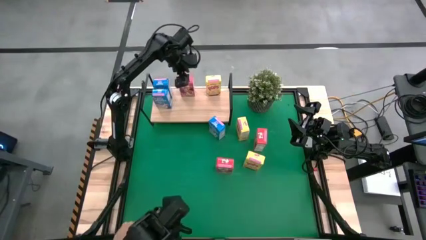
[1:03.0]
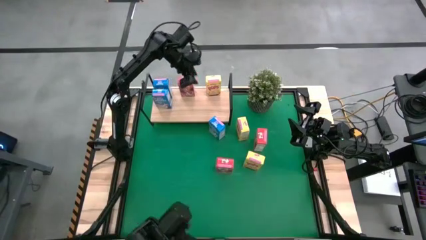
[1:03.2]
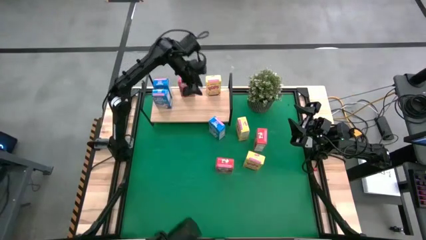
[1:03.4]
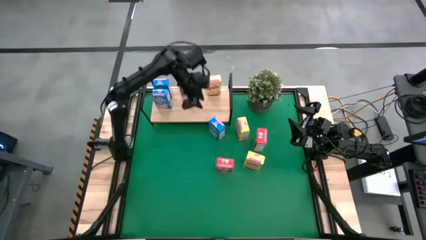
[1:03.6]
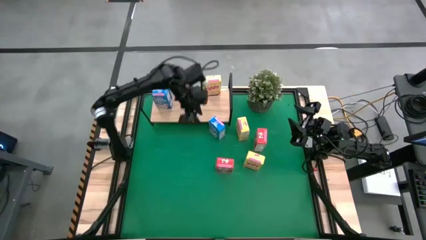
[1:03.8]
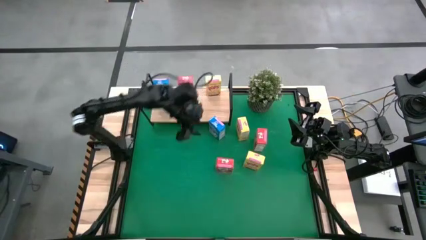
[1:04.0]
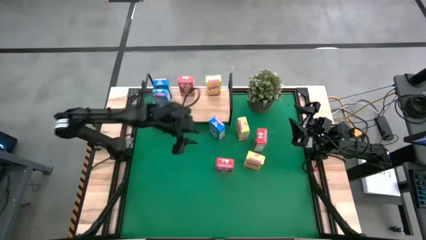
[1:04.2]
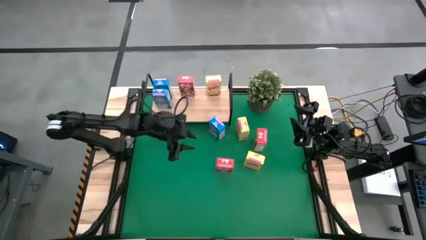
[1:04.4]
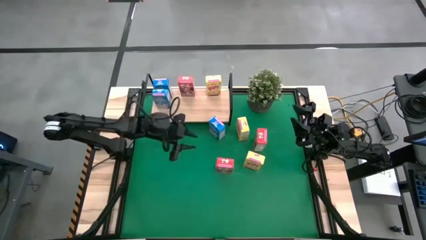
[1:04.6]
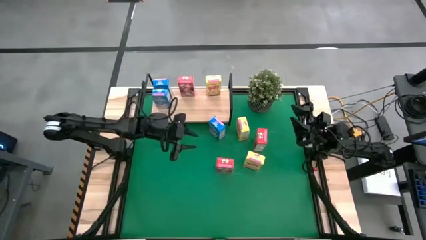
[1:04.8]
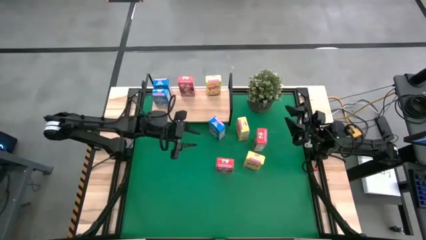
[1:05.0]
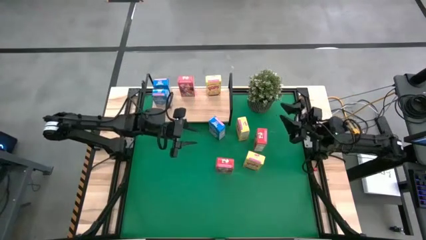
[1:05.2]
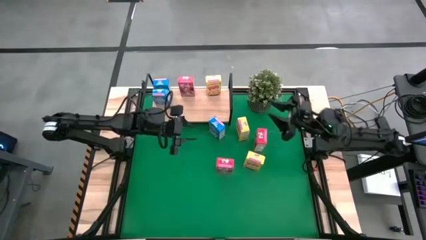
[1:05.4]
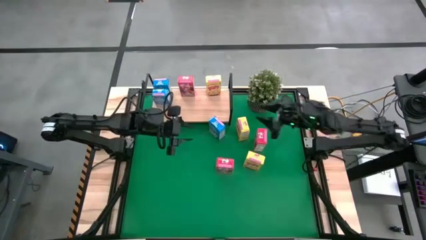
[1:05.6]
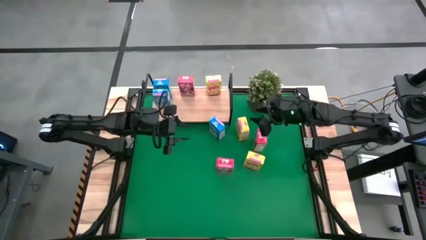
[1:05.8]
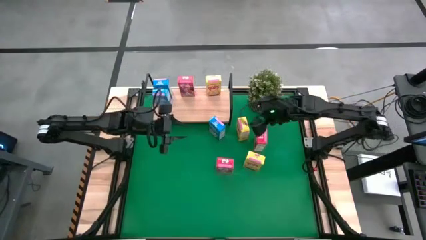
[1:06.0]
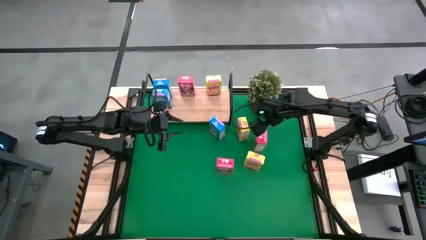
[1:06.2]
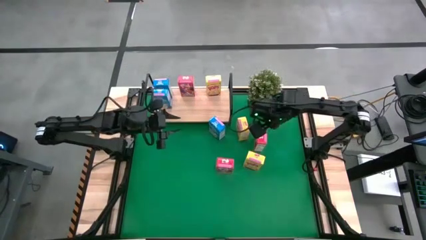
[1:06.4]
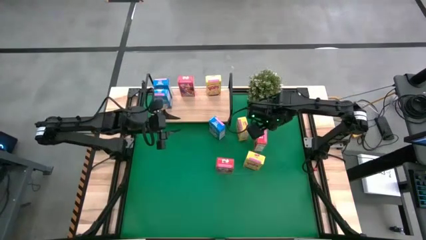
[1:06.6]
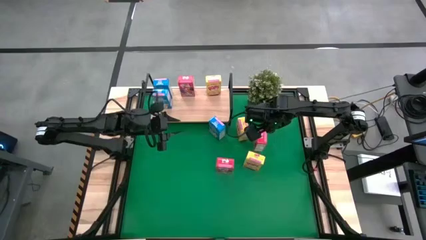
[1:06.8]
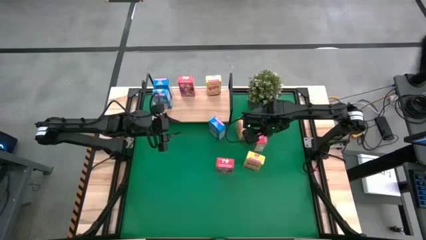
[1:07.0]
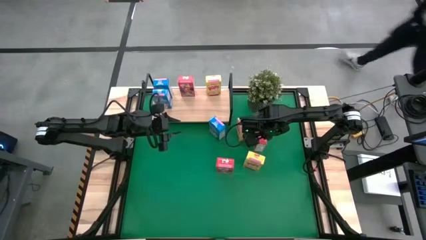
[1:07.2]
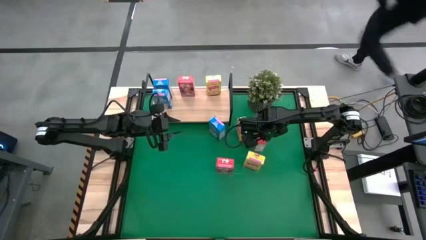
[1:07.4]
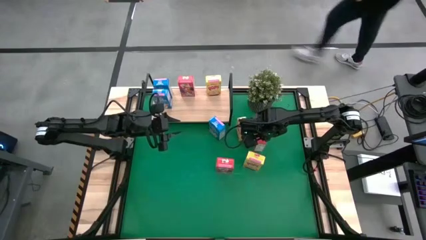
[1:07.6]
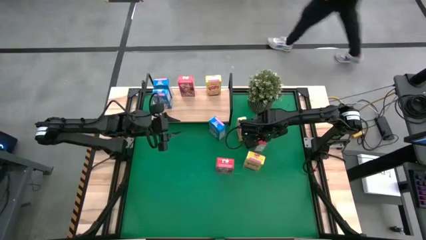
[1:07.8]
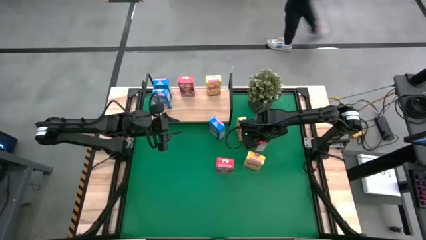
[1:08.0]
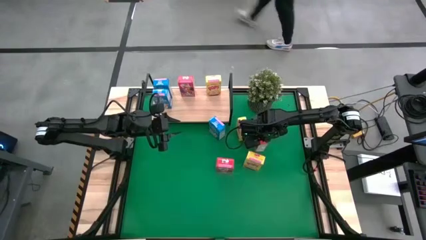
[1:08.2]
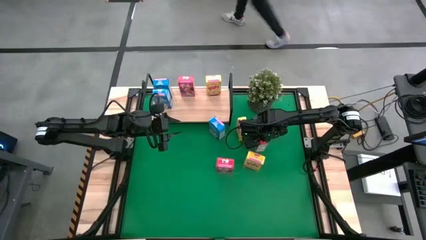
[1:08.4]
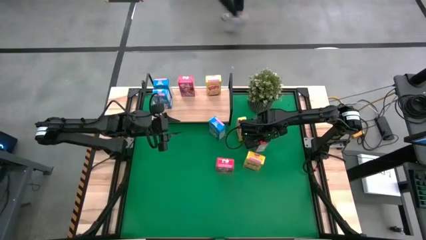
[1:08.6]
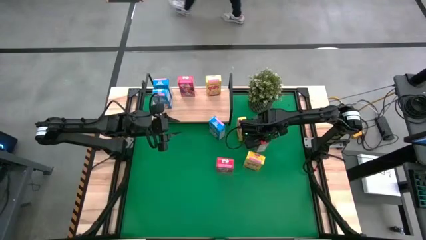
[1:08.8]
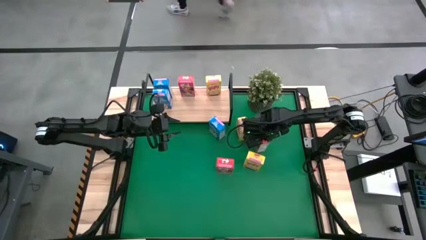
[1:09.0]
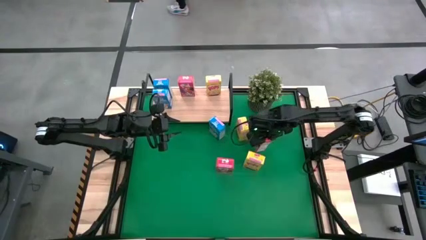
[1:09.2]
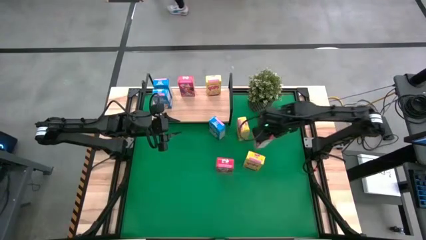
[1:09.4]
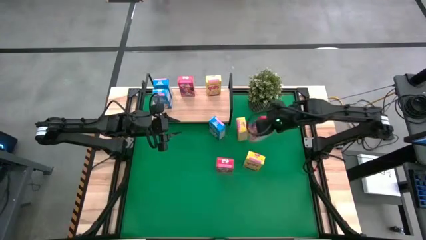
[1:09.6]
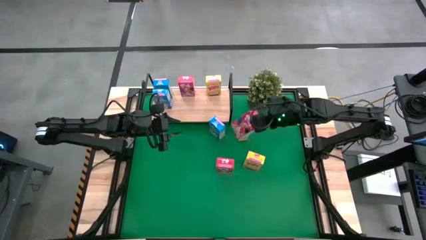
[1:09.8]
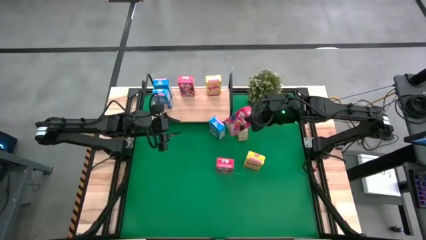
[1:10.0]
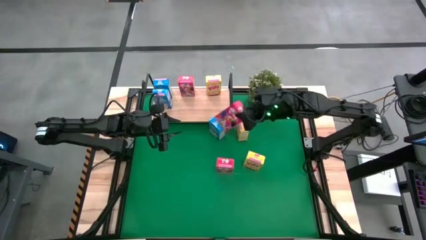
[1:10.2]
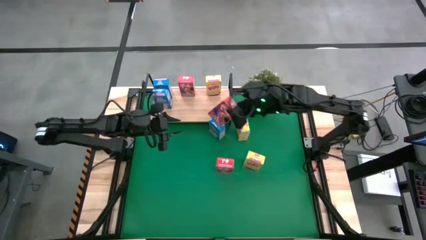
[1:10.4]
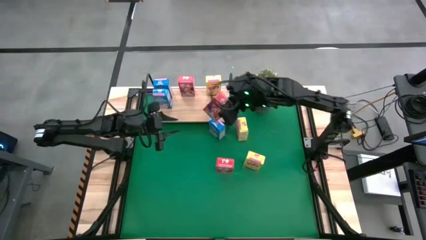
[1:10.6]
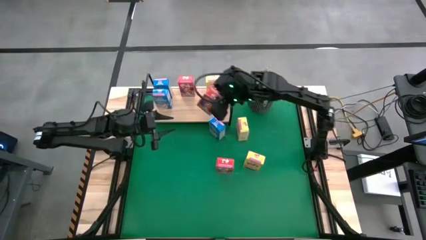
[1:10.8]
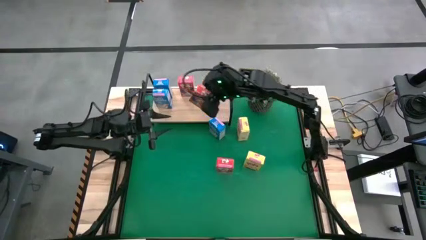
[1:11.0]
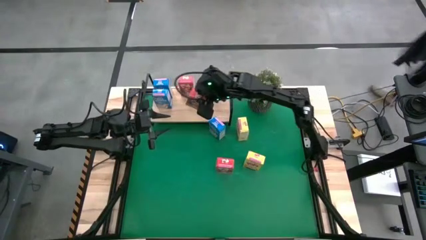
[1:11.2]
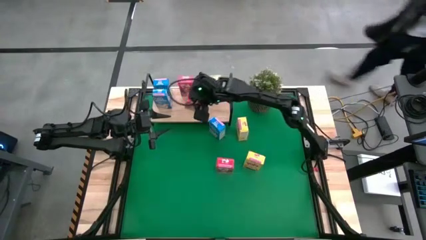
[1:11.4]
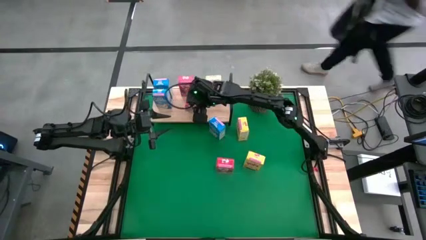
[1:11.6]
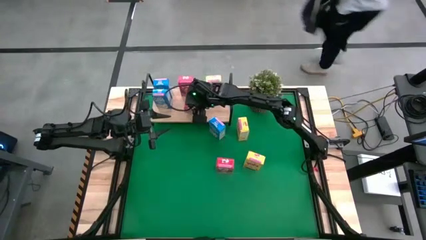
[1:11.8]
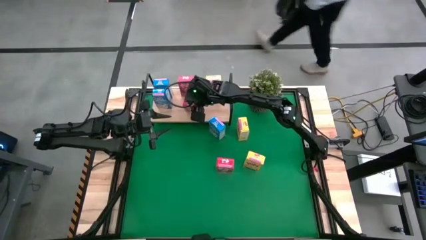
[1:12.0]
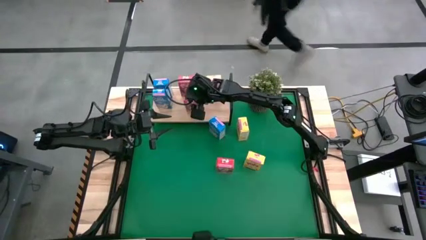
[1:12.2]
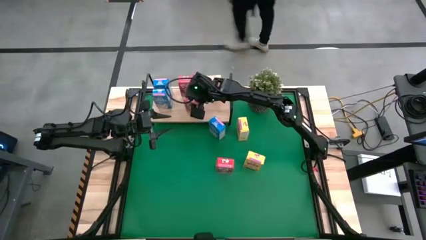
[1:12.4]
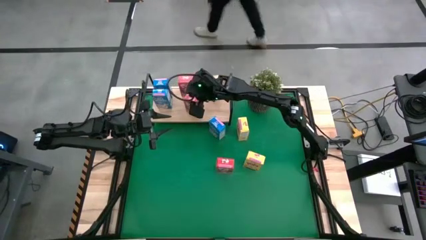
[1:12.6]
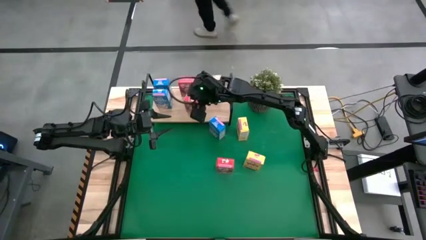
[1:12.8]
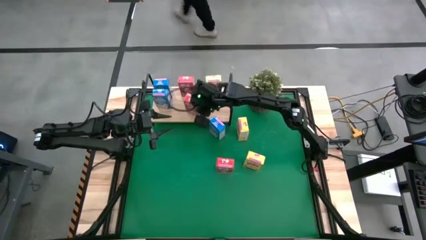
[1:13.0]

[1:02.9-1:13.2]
Task: Stack cereal on shelf
Put the top red cereal box aligned with the other red cereal box on the shelf

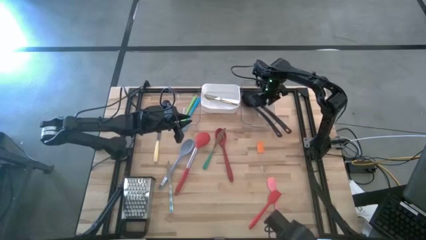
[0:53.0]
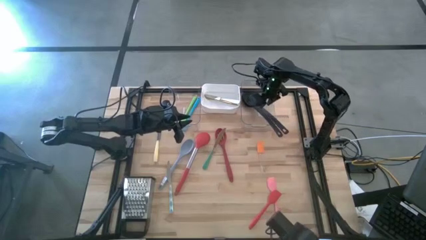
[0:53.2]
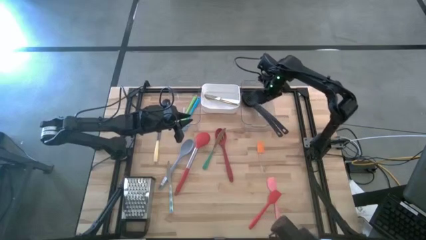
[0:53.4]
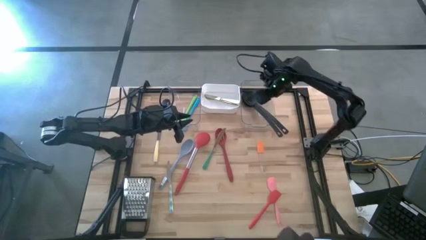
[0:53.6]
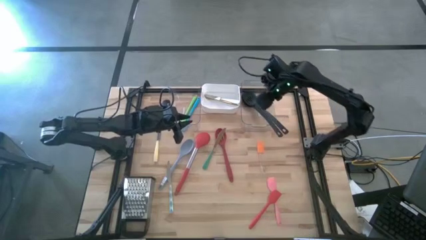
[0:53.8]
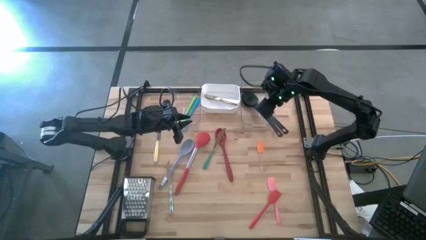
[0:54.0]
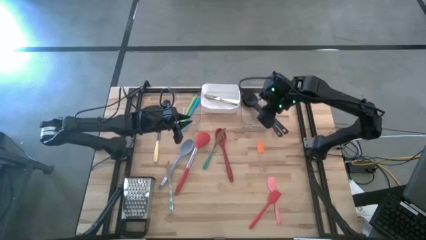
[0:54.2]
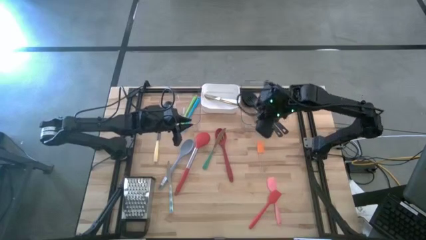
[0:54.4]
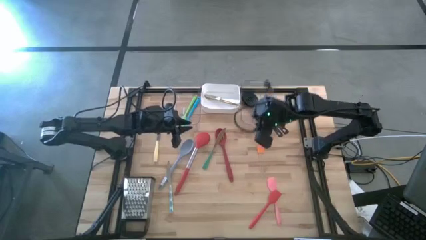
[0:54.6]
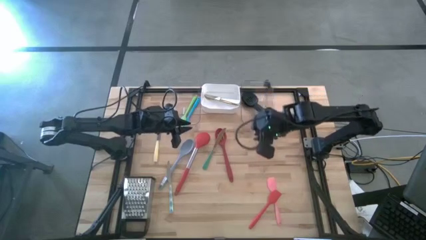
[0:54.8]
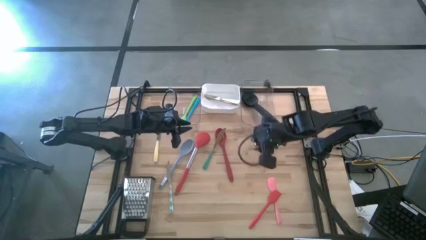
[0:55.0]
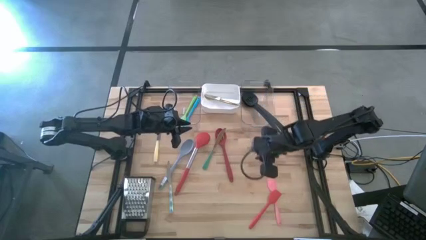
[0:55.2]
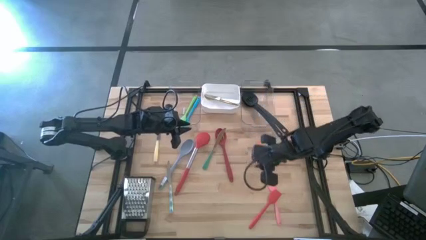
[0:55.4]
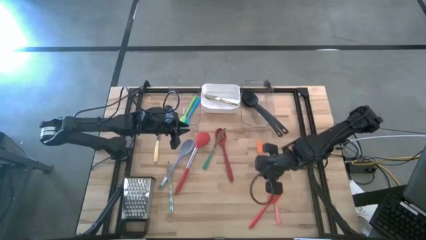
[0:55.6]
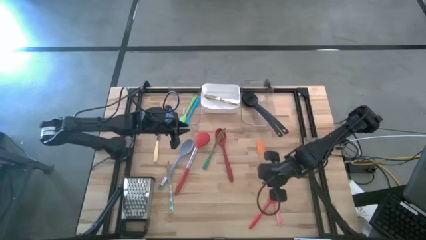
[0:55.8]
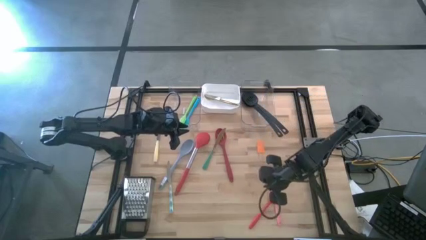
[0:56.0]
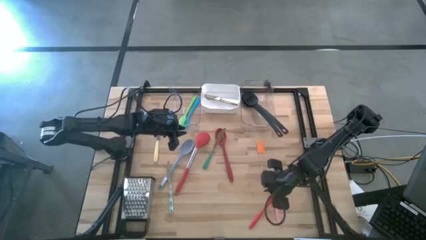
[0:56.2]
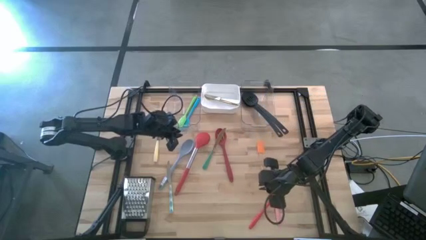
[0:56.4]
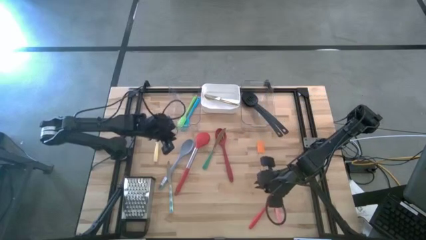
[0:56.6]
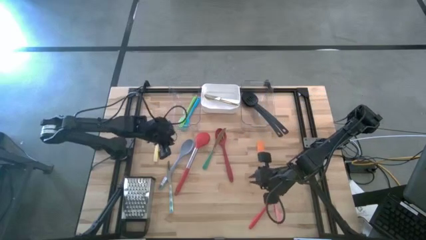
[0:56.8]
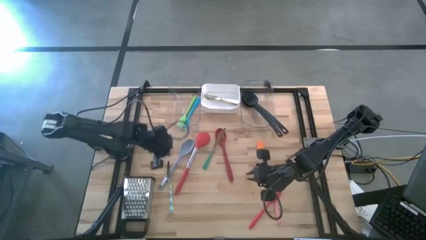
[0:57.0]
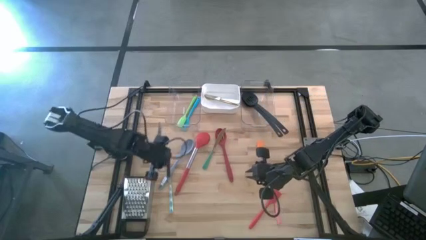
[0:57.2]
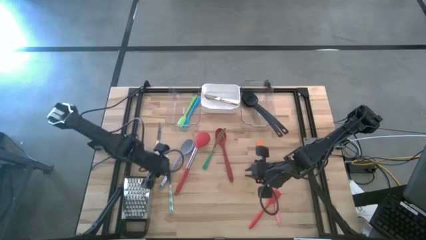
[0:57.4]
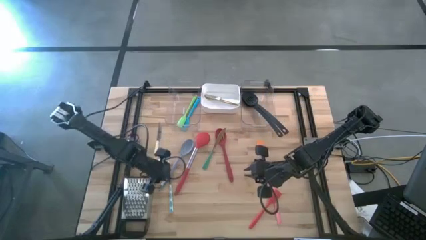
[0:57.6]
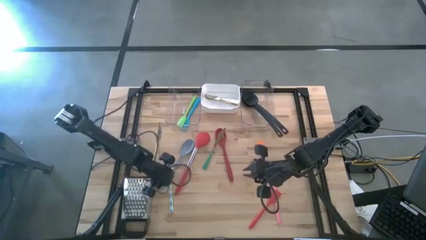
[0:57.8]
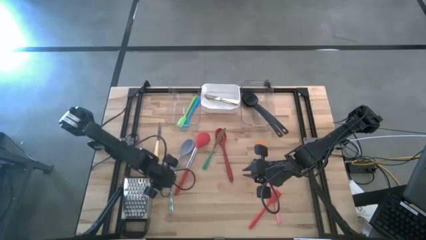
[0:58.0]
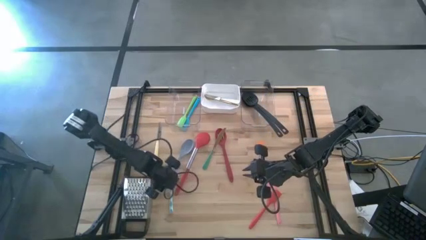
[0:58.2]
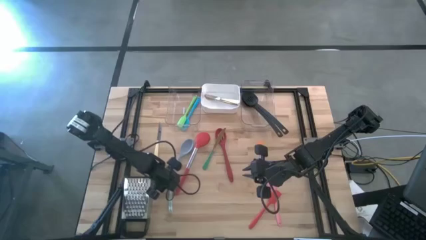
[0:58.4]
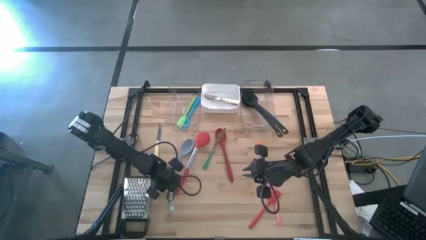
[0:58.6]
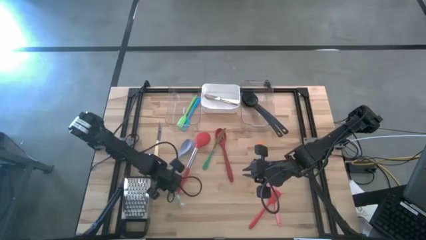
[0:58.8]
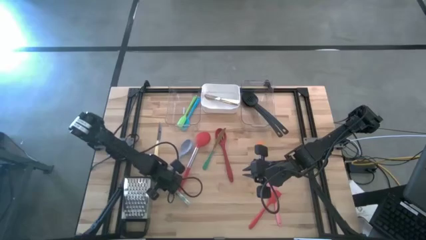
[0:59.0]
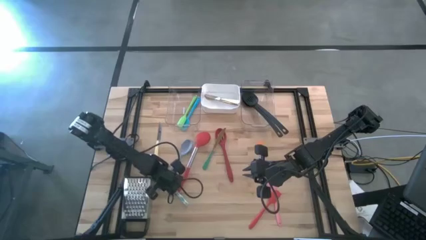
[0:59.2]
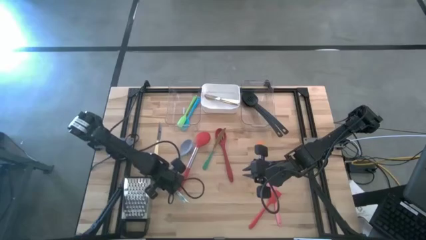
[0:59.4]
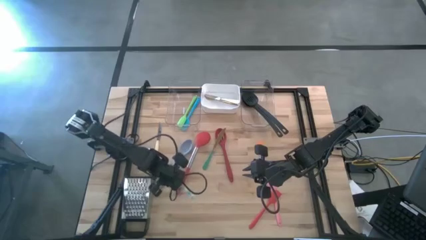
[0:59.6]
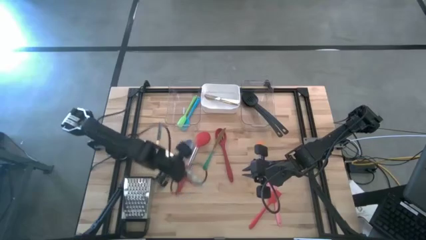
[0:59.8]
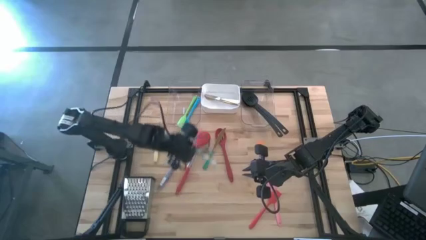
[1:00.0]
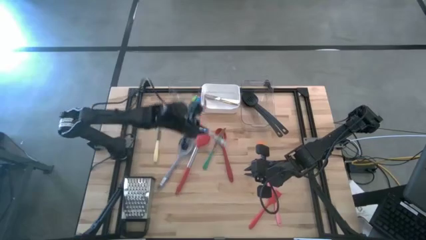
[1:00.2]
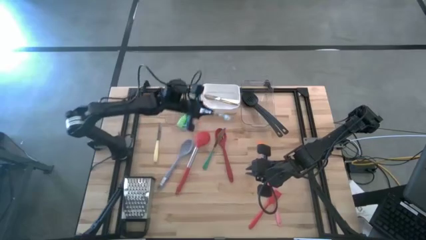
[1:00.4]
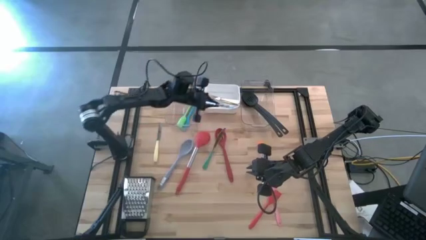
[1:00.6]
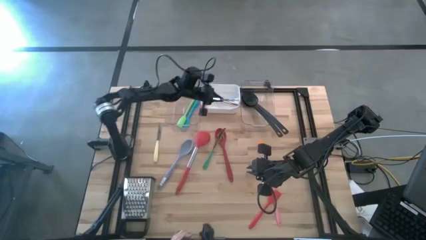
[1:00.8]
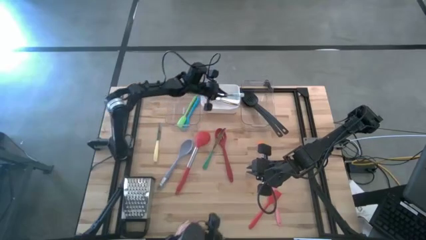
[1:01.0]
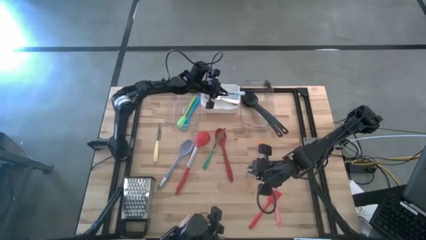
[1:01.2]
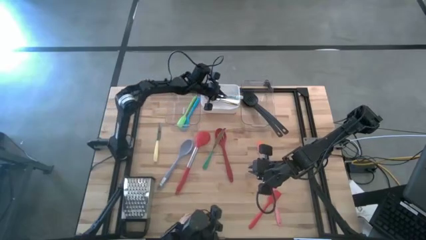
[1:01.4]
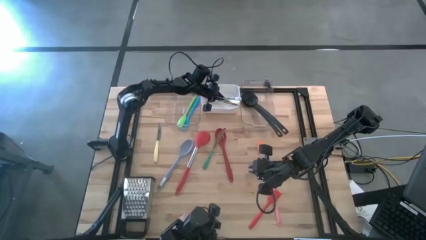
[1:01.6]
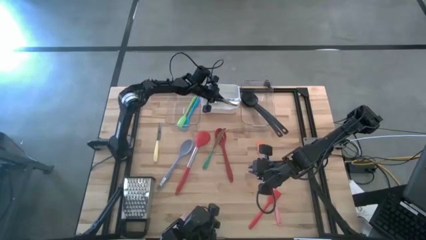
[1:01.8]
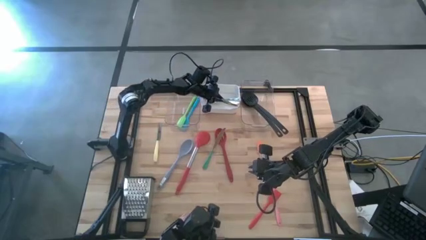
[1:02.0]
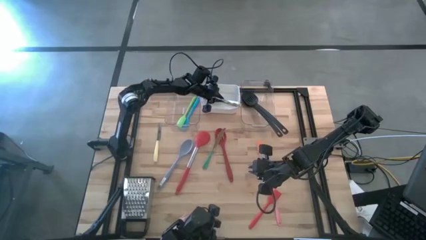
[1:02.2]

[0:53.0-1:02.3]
Task: Pick & Place Kitchen Items
Put the blue and white knife into the white bin
